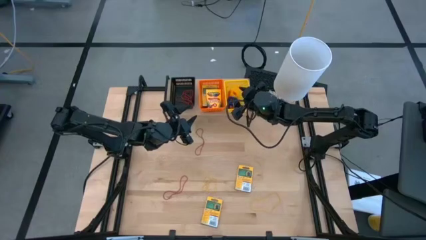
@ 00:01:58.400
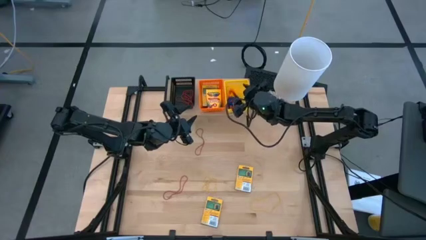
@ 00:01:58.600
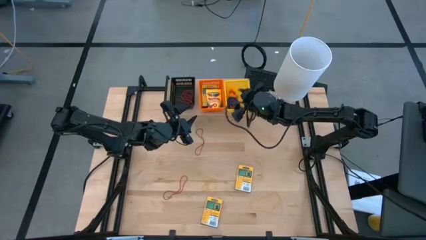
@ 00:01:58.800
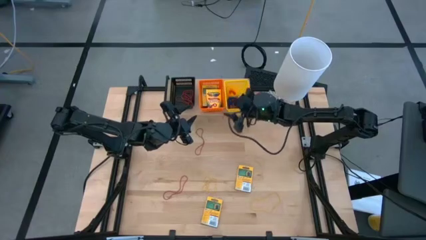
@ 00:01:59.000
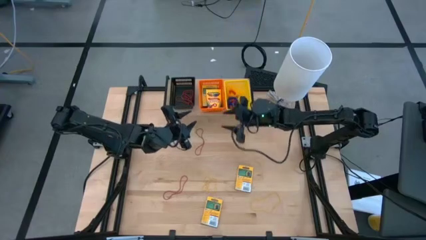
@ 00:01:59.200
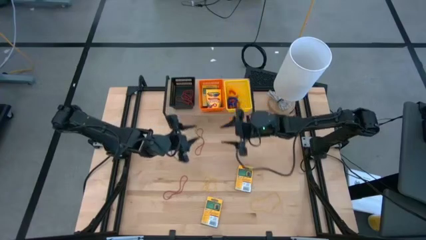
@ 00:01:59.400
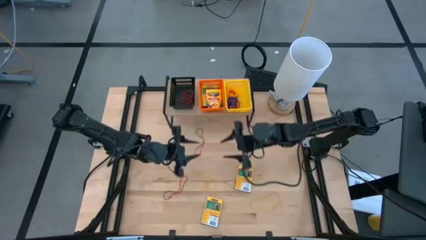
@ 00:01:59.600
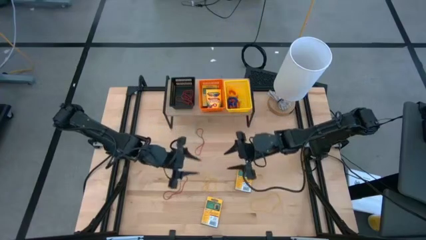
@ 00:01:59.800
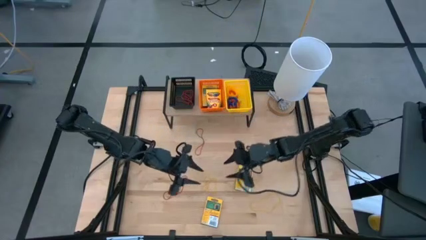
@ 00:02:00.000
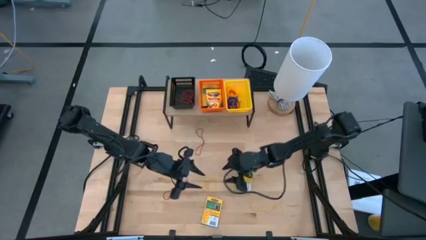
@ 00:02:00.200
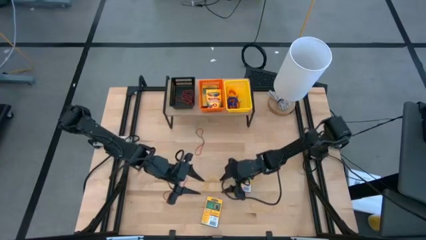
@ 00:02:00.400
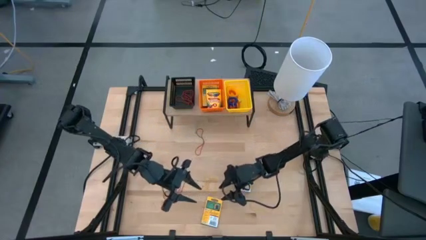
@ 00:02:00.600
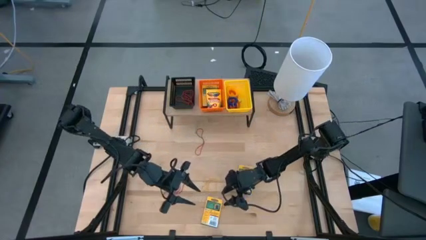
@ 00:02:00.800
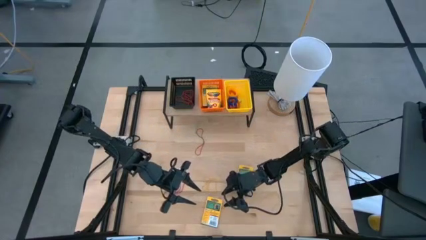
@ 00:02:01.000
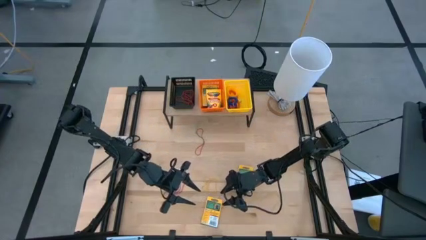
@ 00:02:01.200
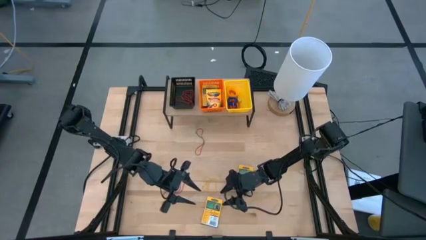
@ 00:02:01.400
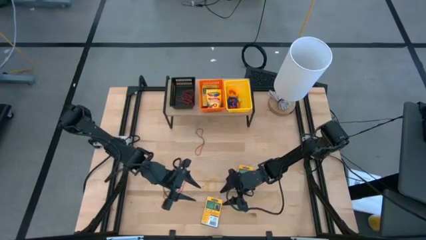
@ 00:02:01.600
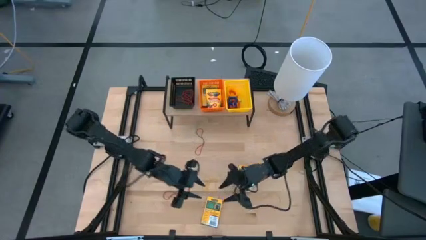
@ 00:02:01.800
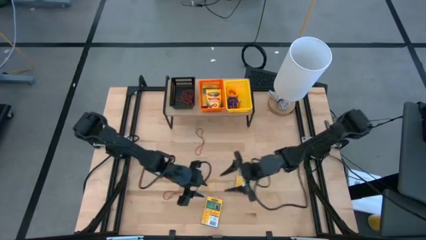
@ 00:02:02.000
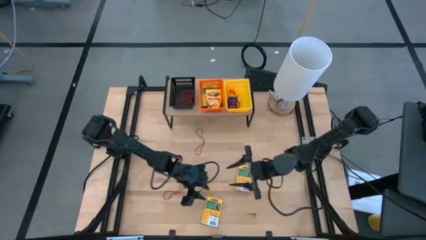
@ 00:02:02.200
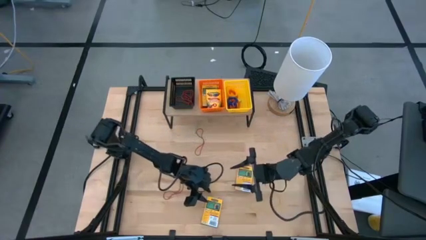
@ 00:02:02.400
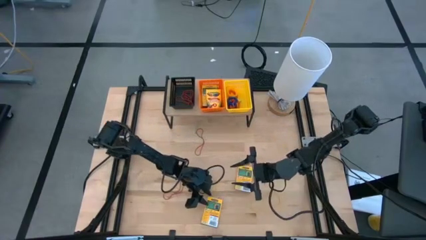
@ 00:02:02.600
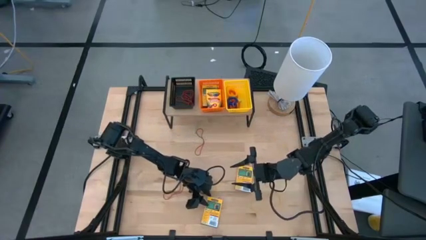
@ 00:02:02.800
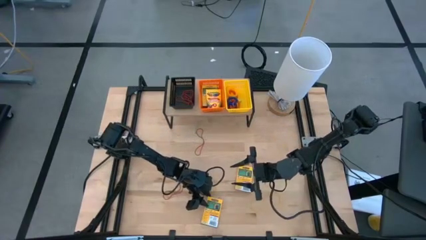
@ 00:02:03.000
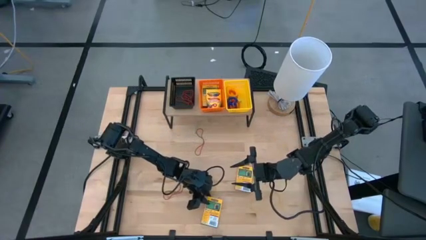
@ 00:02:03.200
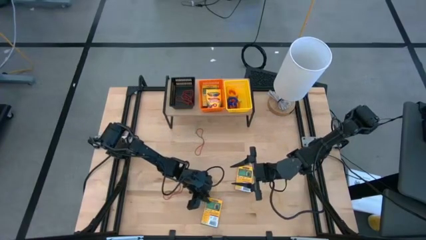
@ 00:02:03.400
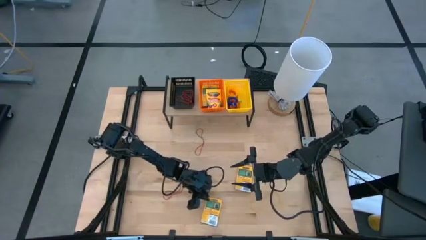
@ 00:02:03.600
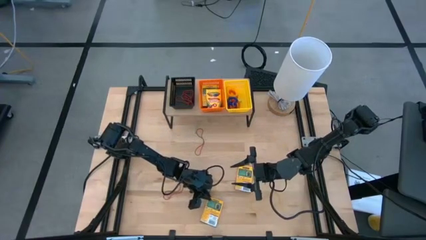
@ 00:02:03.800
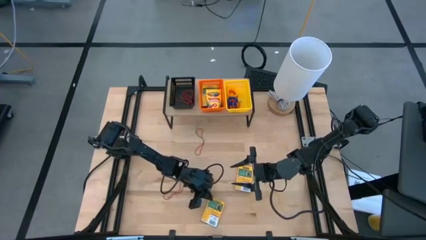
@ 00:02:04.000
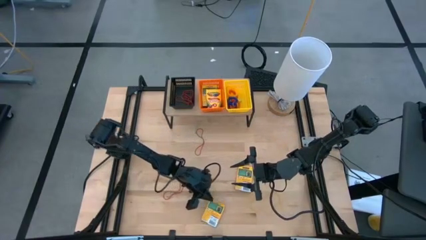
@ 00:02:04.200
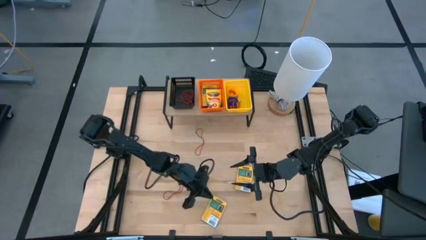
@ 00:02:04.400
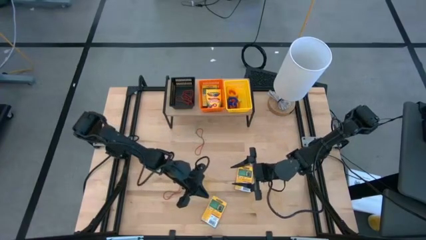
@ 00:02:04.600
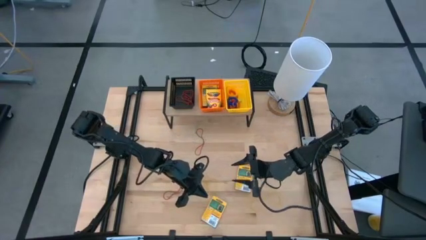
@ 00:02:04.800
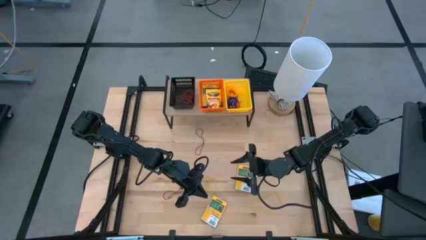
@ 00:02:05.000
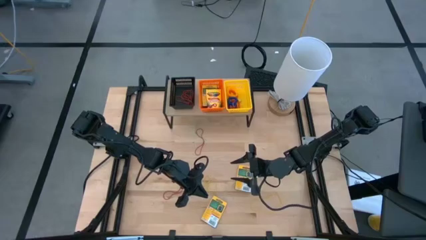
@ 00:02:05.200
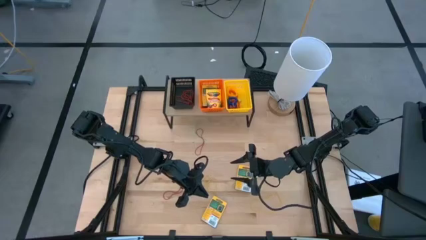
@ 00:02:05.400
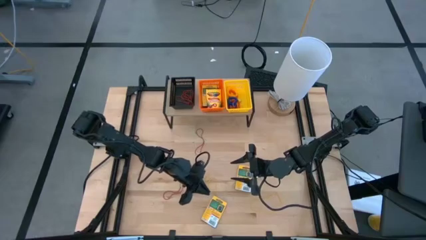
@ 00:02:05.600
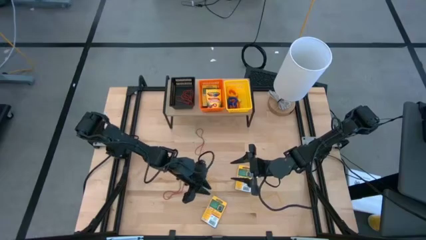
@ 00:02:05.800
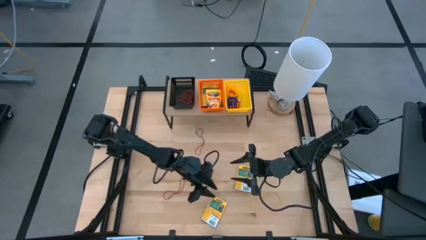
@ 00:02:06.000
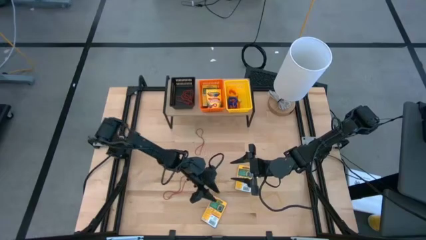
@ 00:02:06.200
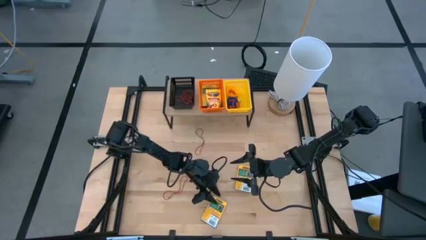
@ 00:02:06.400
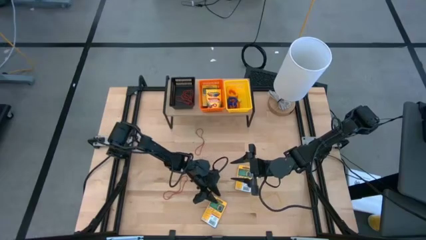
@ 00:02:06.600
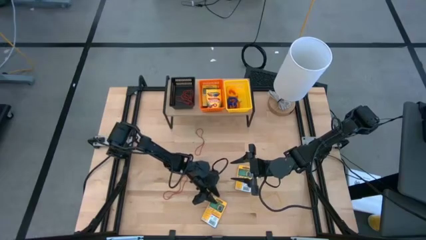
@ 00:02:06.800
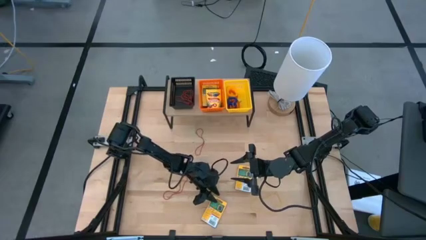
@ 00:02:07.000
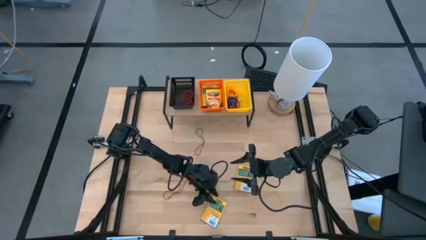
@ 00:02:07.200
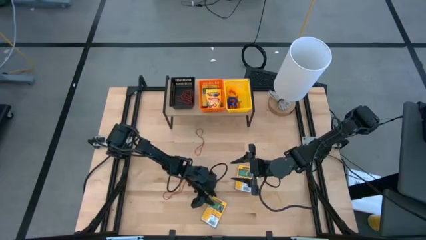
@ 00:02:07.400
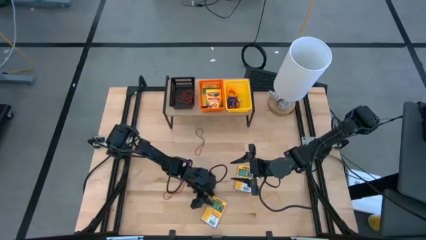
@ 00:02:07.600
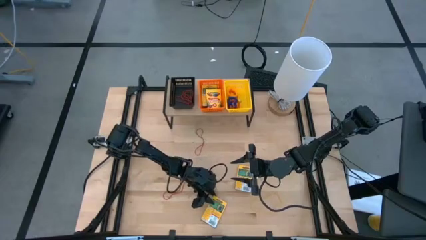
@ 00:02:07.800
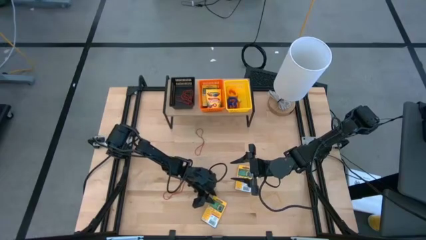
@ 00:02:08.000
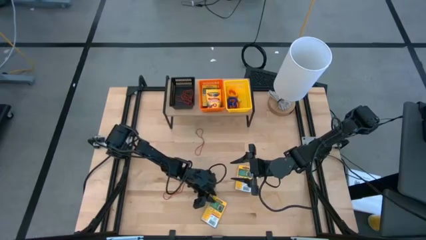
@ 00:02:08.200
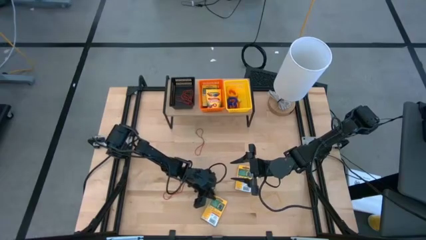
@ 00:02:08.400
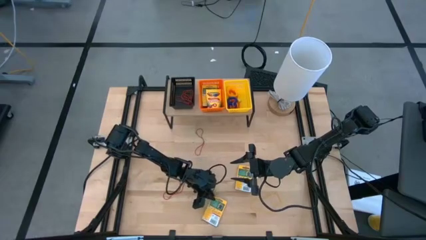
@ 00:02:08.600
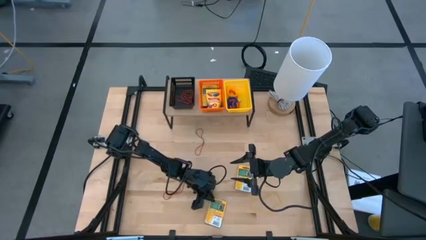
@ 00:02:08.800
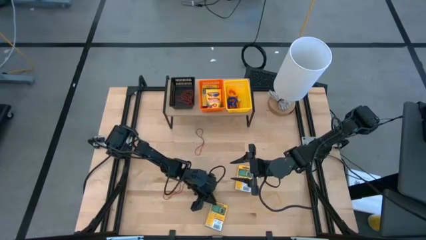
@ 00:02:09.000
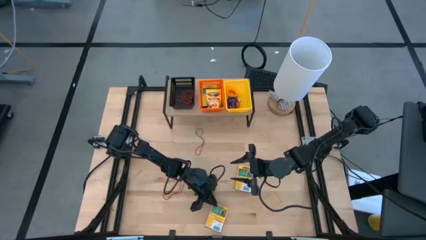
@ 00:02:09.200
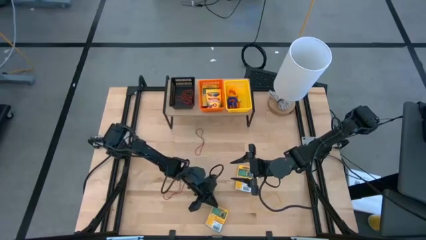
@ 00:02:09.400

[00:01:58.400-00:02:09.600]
Task: Pick & Place Office Desk Supplies
Put the yellow crayon box into the orange bin on the shelf
